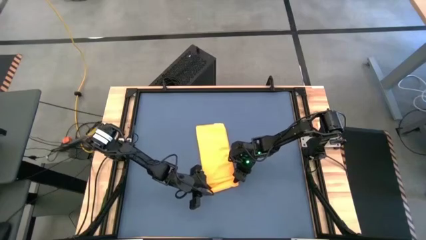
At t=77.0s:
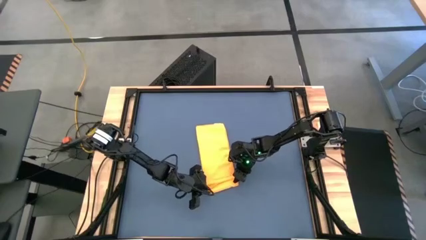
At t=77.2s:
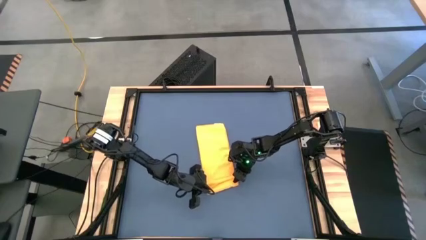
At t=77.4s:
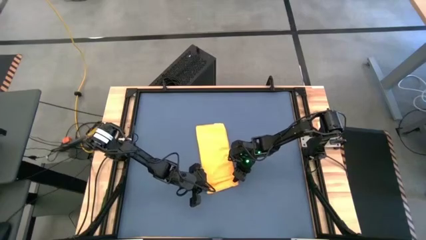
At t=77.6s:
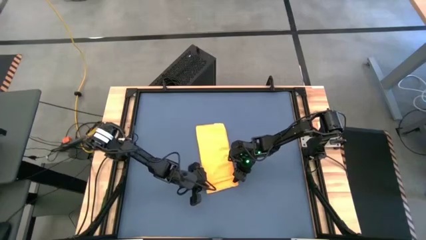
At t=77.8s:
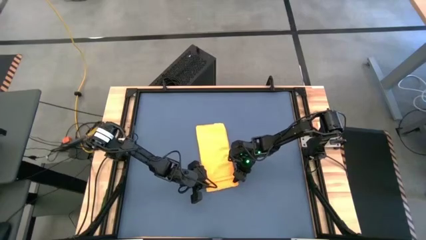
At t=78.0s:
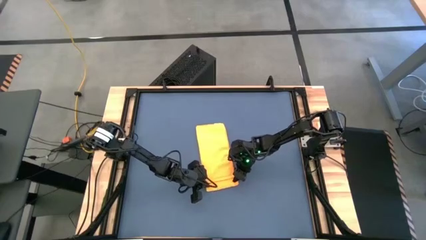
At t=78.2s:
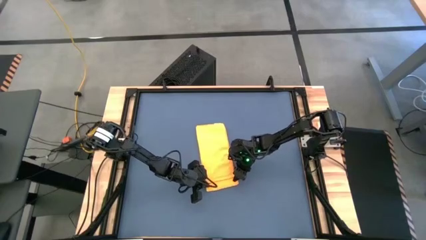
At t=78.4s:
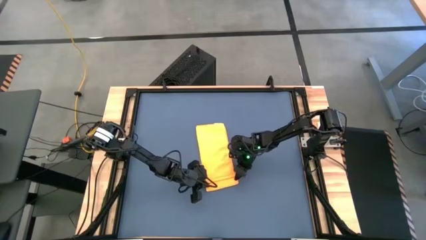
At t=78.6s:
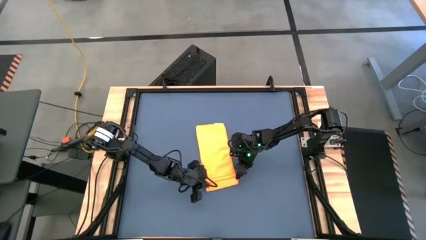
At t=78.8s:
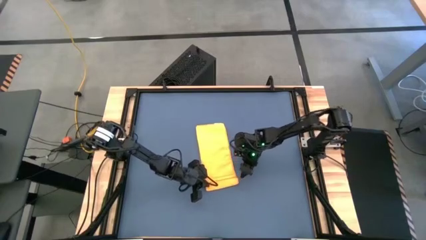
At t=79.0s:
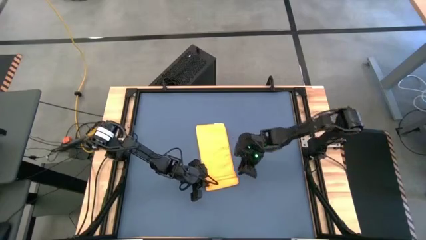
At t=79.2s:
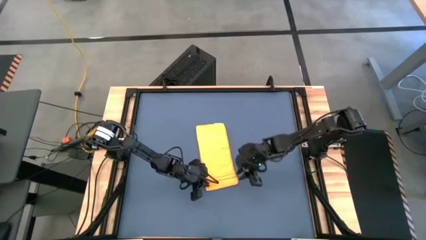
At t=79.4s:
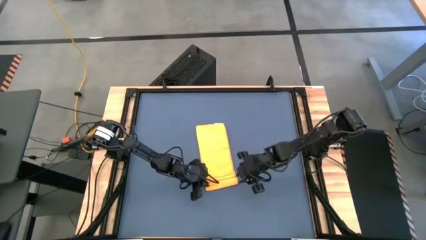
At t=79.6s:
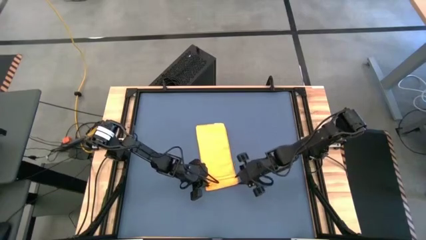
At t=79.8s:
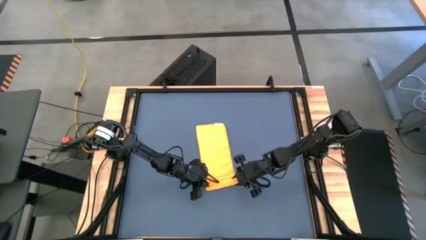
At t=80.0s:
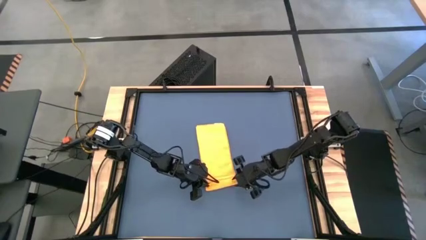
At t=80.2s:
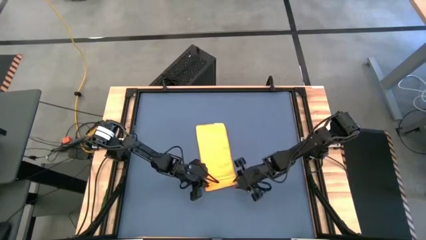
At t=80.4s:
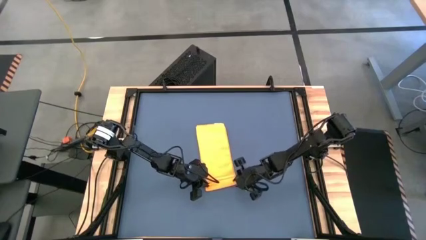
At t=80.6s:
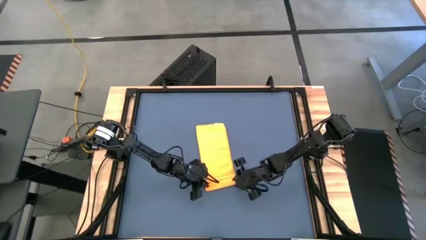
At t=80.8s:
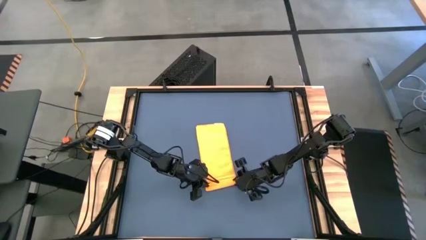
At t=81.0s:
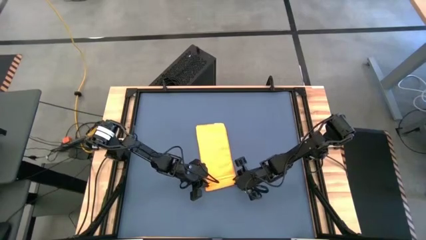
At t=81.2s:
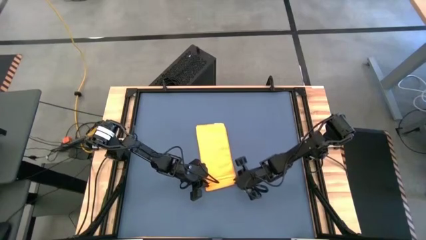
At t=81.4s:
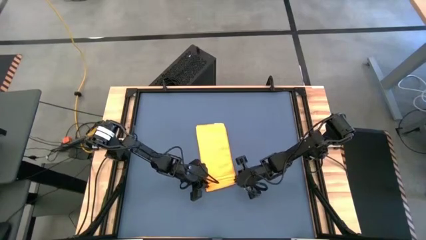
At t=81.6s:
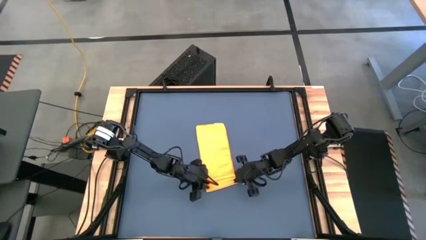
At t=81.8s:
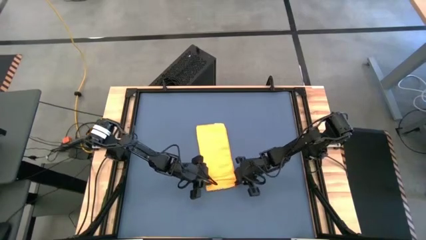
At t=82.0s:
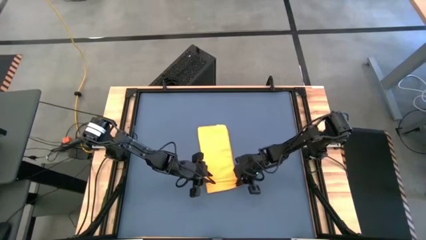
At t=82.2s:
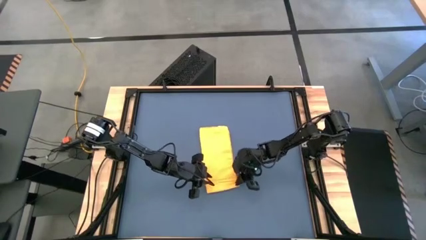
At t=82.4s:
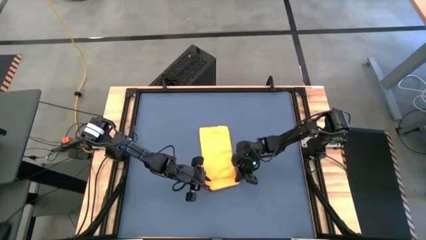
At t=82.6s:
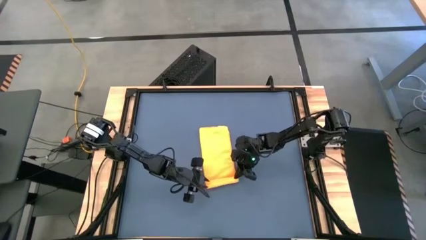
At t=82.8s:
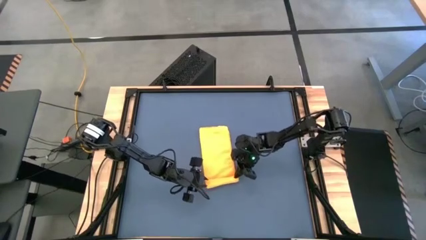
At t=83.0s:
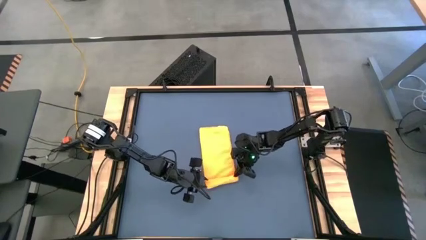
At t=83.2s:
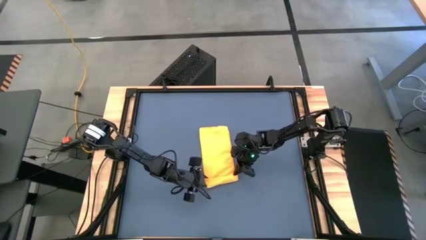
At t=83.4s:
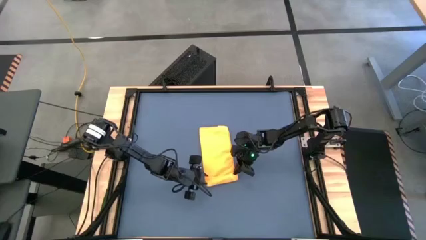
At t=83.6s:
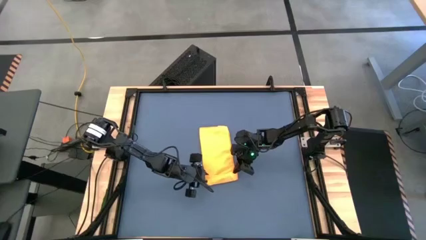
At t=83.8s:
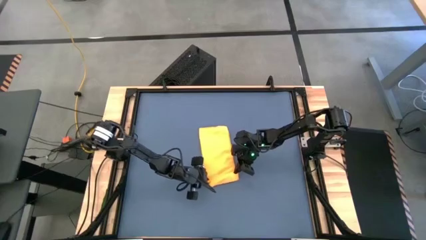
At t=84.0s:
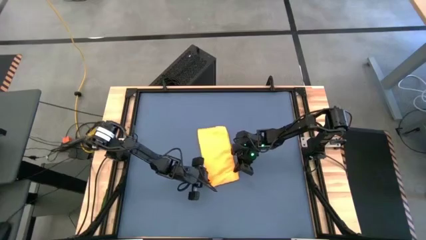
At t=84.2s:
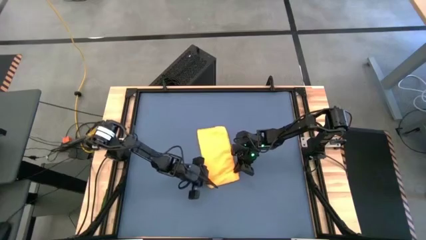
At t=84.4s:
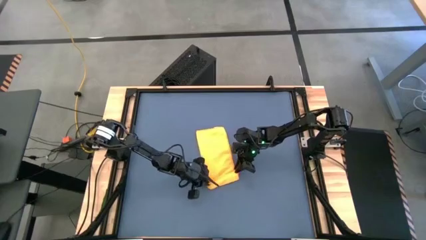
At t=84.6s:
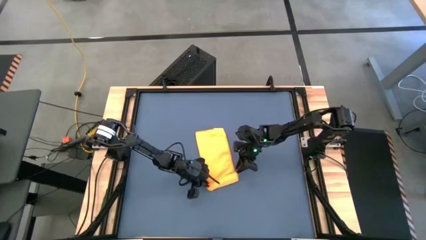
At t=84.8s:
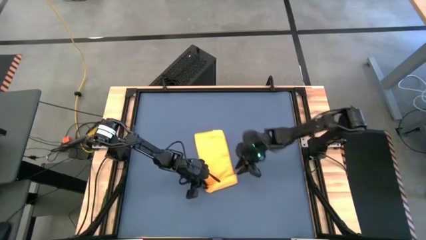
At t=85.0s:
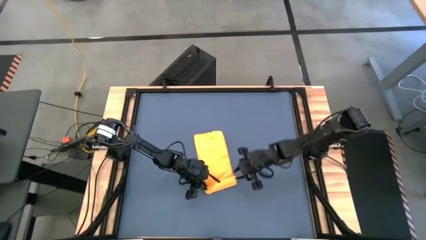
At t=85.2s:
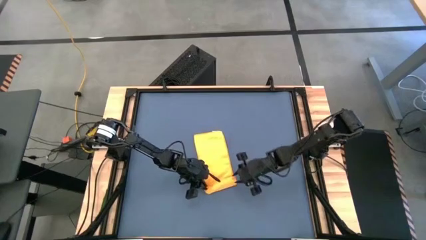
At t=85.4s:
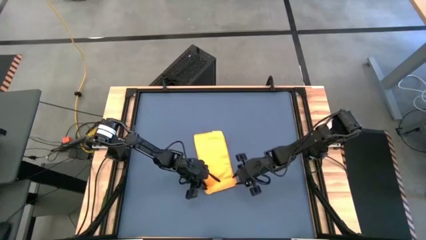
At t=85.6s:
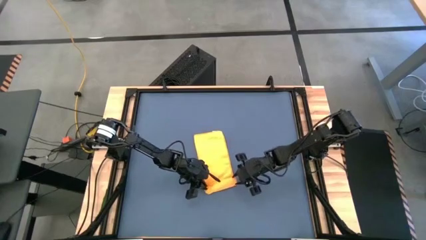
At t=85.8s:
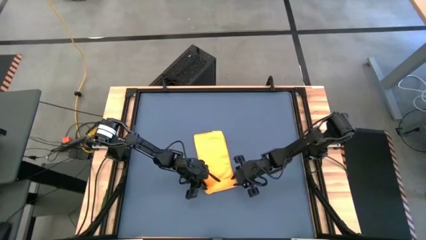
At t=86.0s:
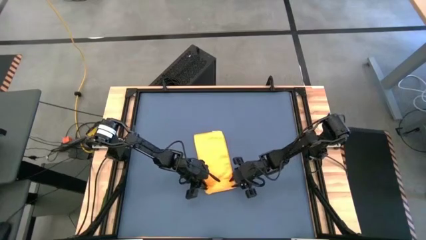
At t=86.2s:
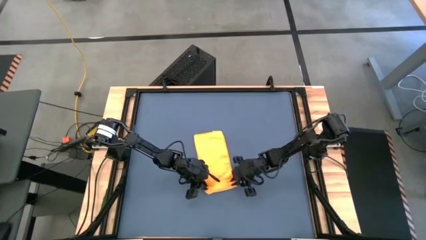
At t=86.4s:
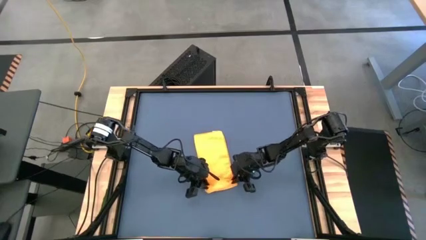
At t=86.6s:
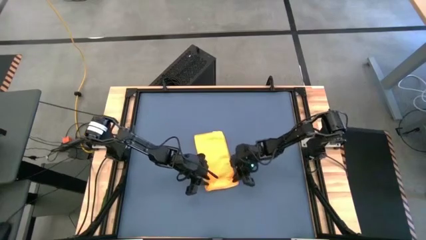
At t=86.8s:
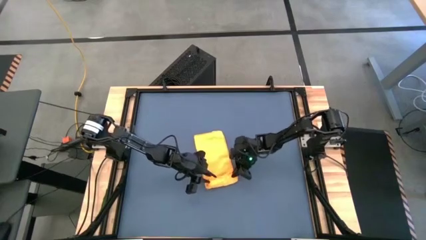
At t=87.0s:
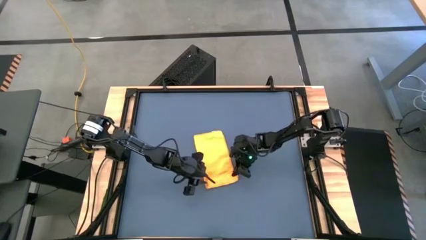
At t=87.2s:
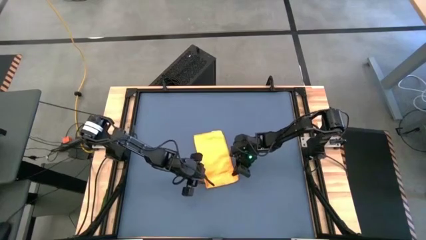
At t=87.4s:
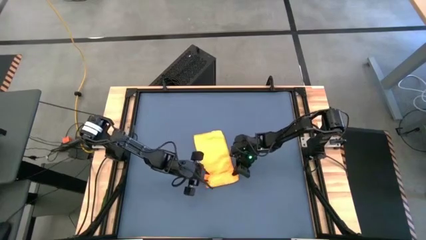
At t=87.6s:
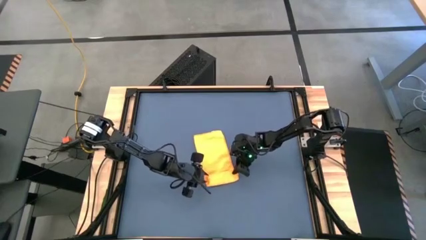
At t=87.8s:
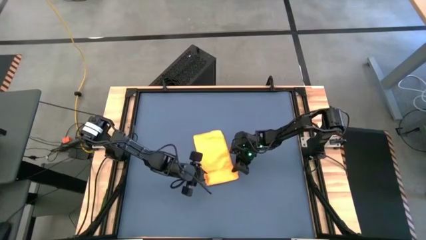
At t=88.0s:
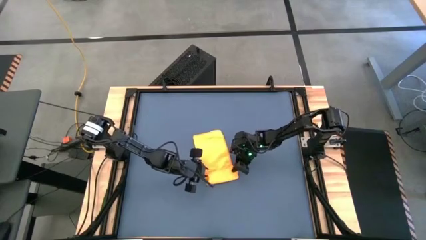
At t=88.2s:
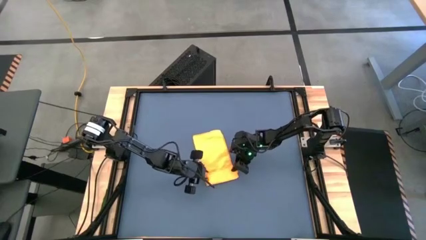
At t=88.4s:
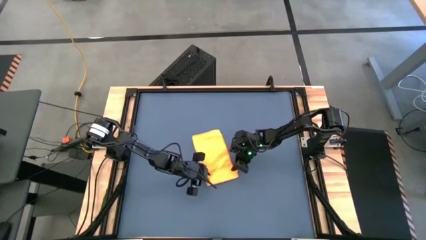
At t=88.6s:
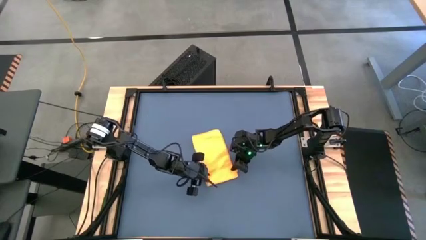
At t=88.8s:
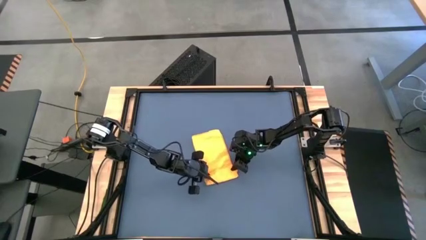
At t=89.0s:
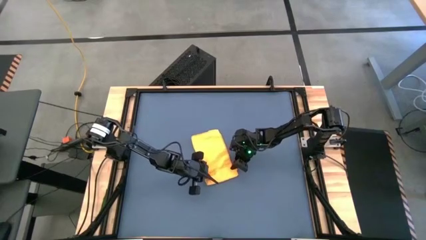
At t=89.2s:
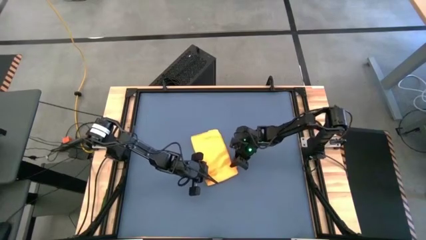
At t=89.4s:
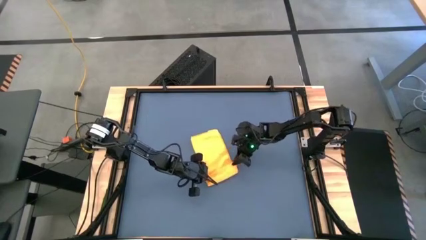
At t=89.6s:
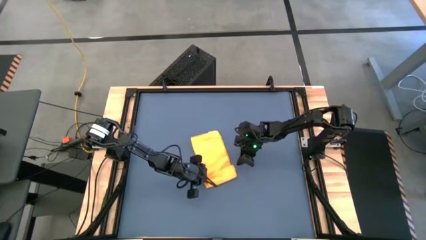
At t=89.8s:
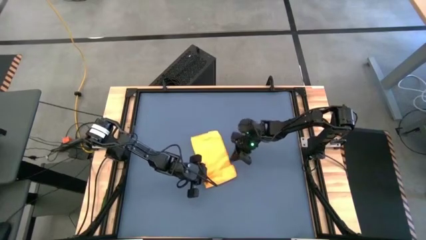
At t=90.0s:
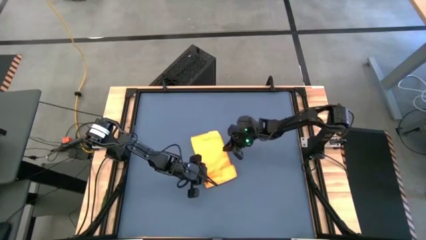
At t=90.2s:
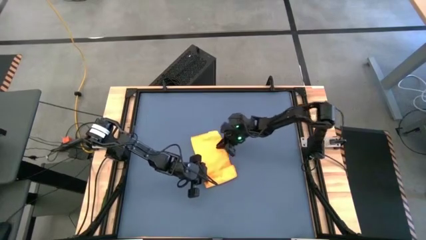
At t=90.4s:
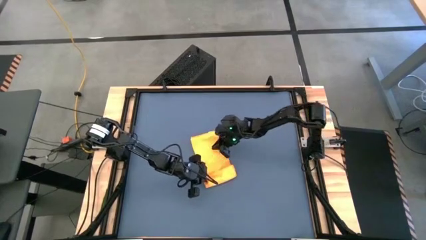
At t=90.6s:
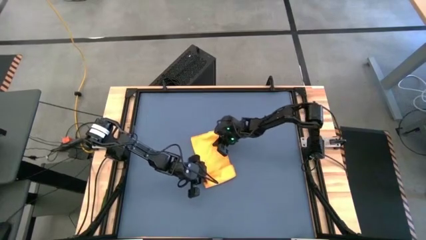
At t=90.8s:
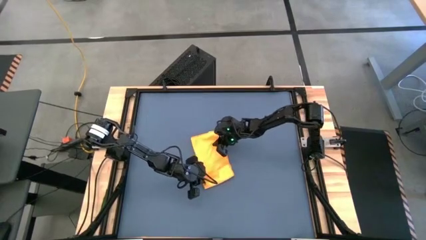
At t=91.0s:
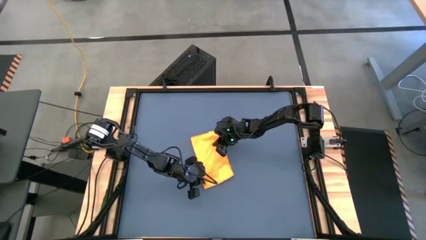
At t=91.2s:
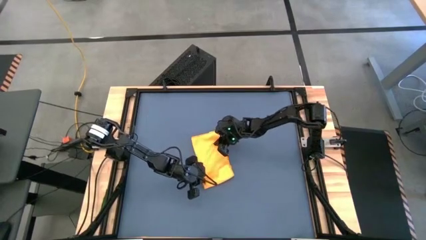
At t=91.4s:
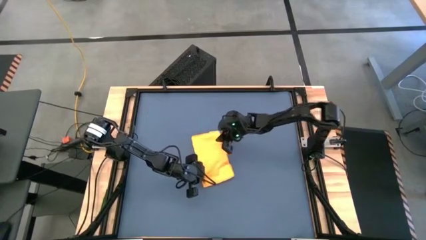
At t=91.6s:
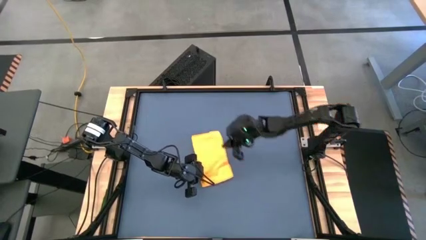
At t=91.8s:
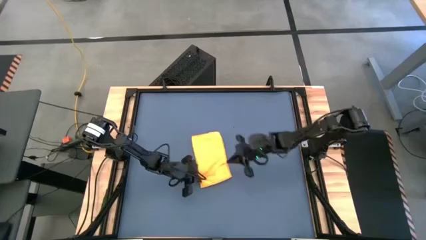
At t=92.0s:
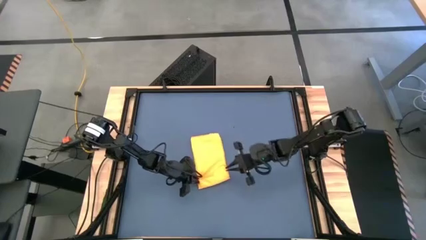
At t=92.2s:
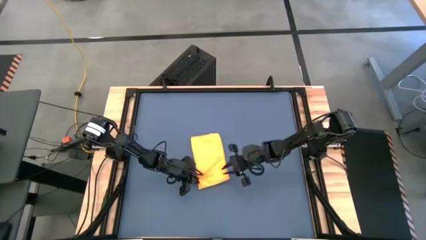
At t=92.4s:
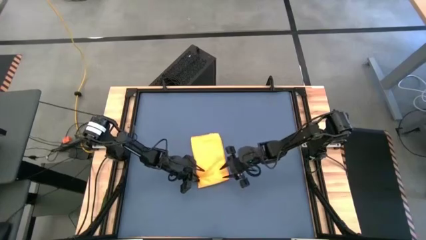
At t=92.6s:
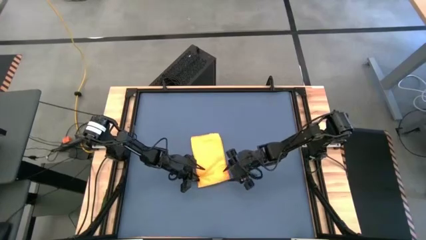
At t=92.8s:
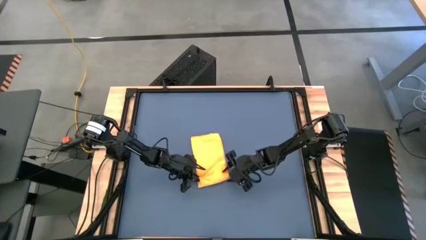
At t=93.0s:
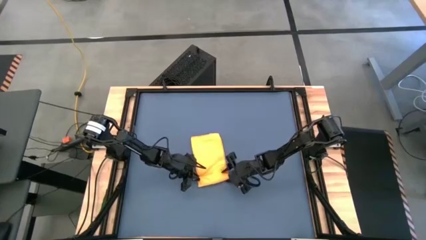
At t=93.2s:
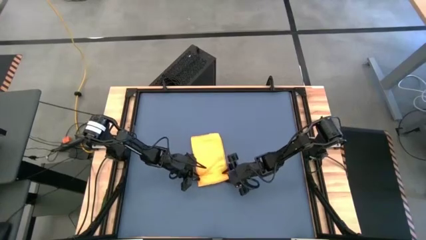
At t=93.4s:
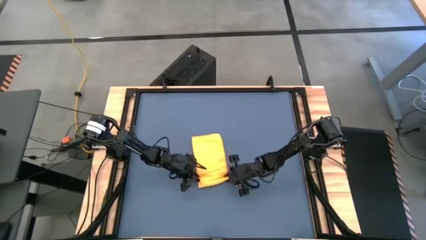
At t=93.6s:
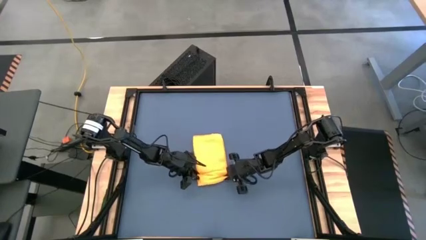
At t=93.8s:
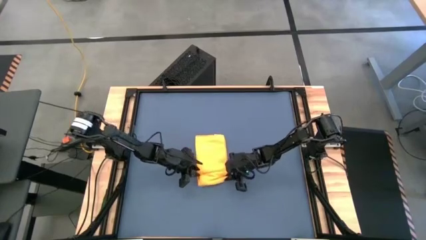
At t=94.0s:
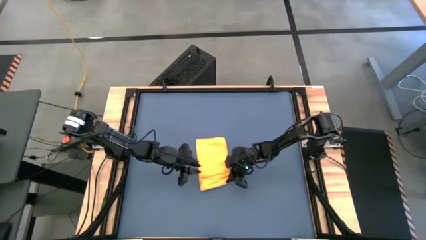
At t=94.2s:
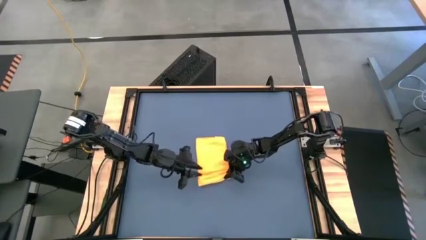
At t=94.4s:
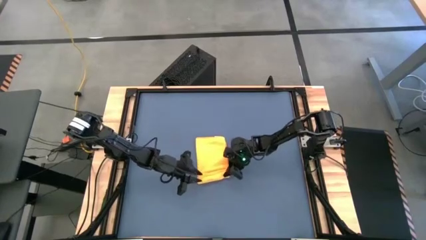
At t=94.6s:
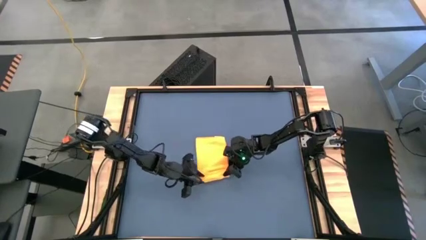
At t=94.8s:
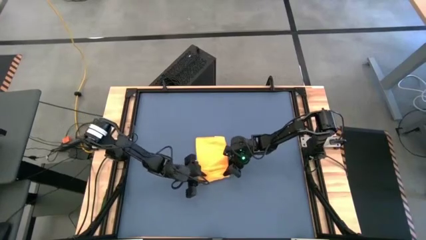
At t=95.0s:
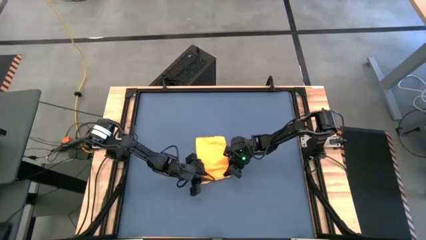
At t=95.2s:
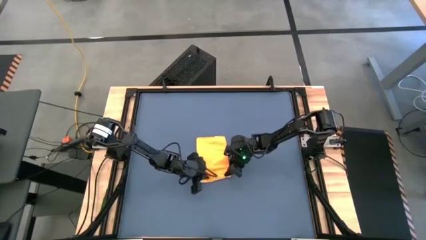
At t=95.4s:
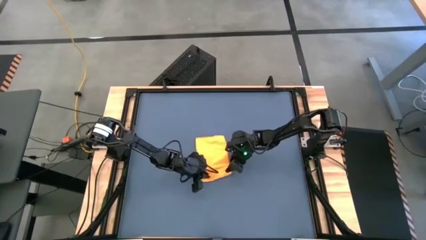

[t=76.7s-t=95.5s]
Task: Roll towel
Roll the yellow microfiber towel
